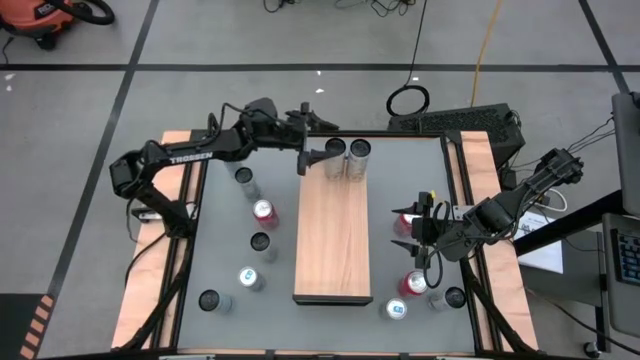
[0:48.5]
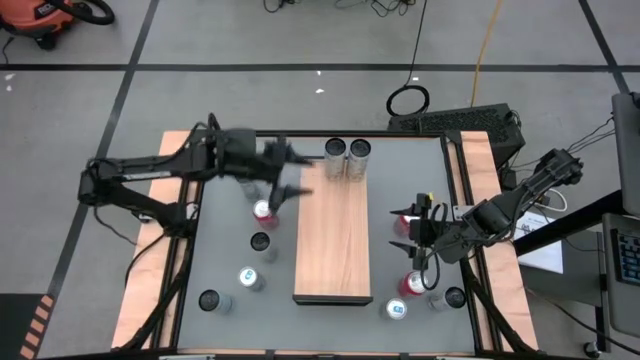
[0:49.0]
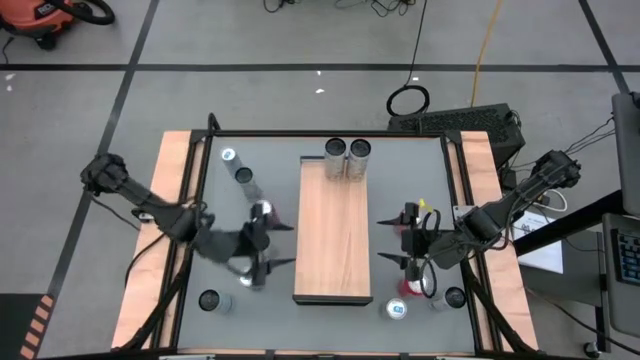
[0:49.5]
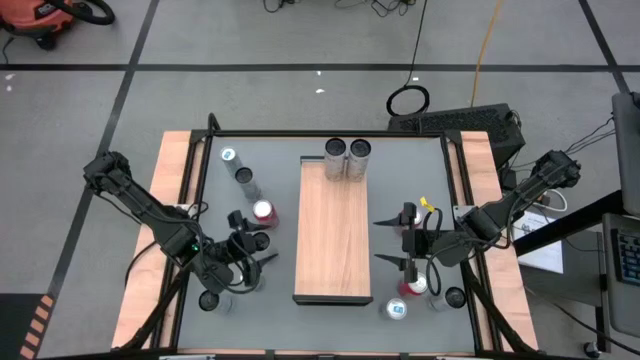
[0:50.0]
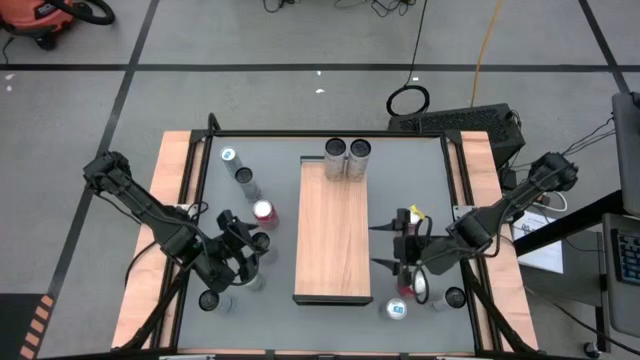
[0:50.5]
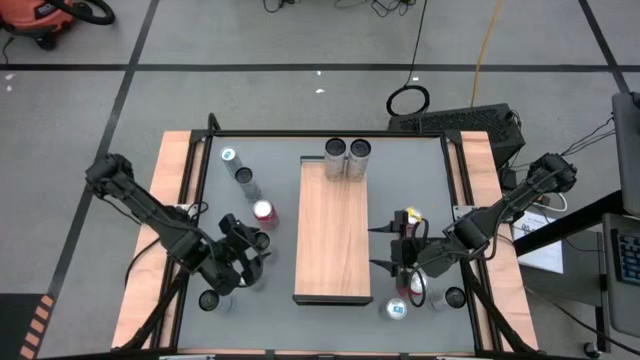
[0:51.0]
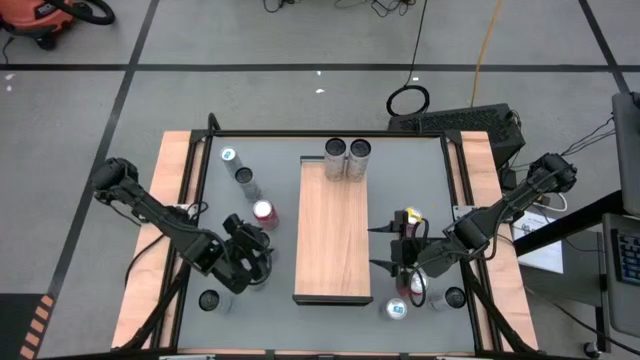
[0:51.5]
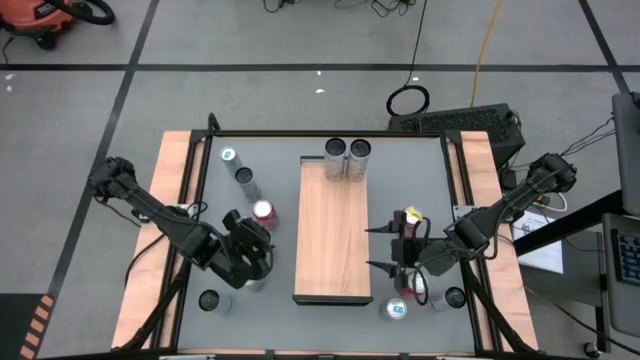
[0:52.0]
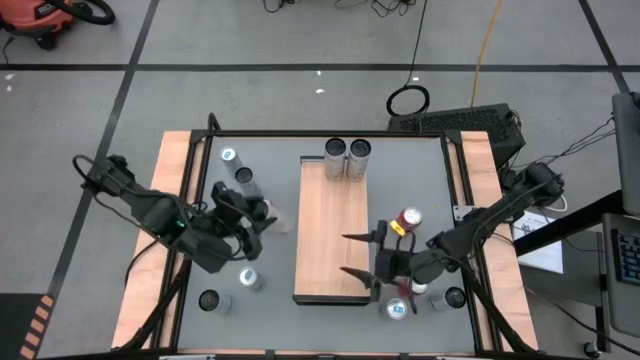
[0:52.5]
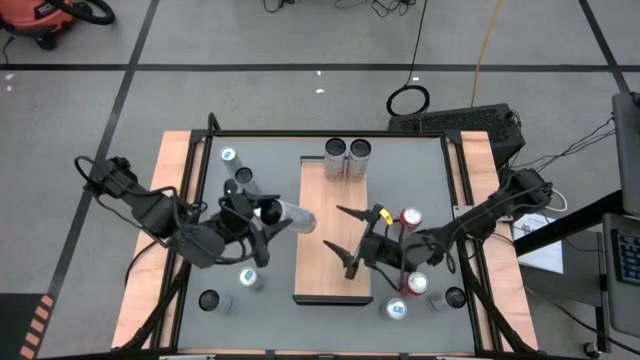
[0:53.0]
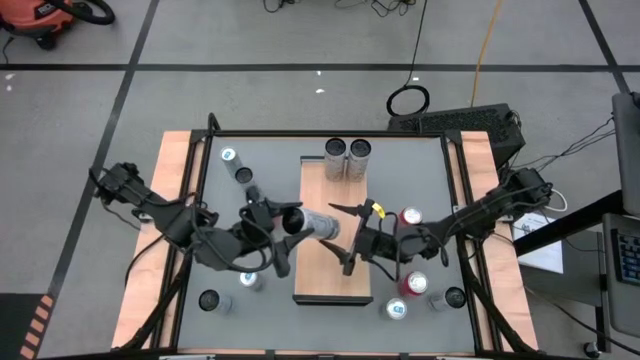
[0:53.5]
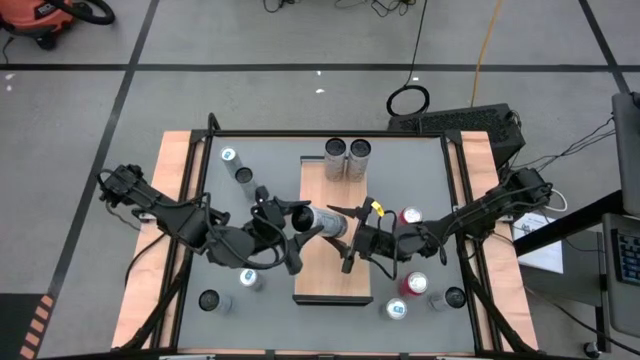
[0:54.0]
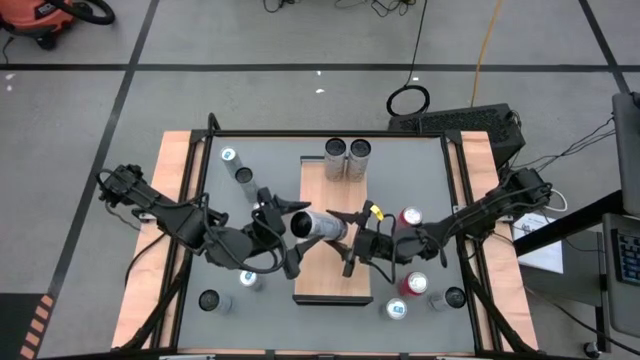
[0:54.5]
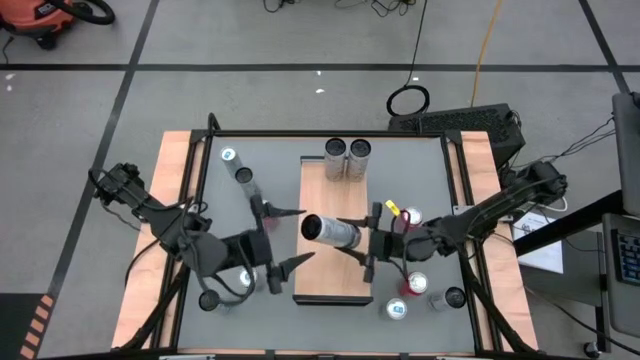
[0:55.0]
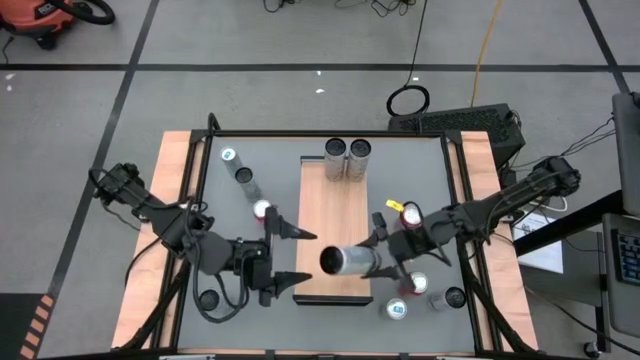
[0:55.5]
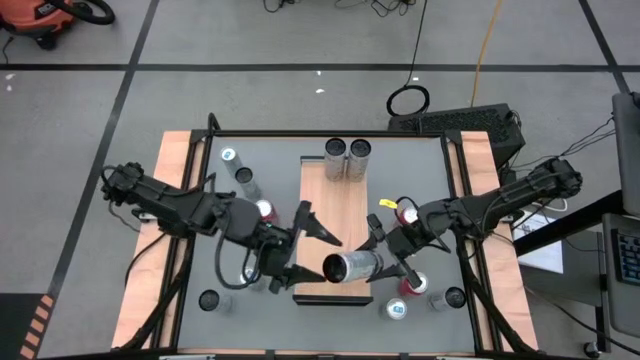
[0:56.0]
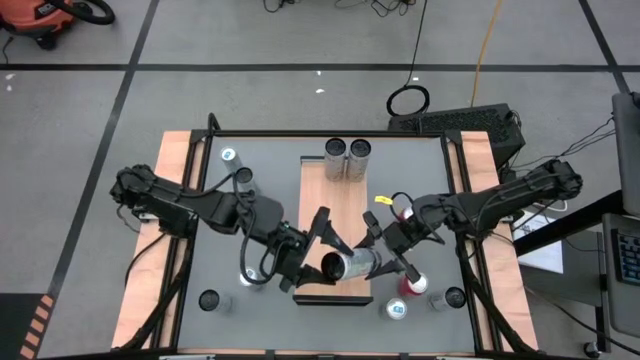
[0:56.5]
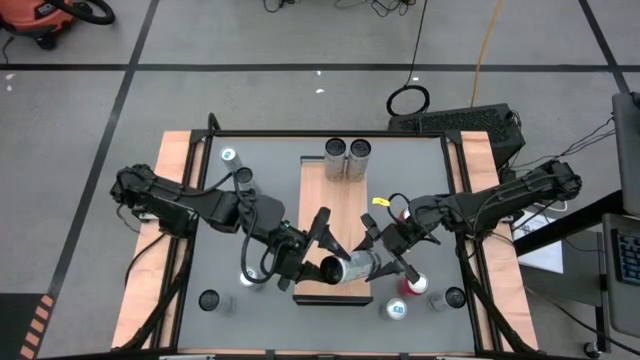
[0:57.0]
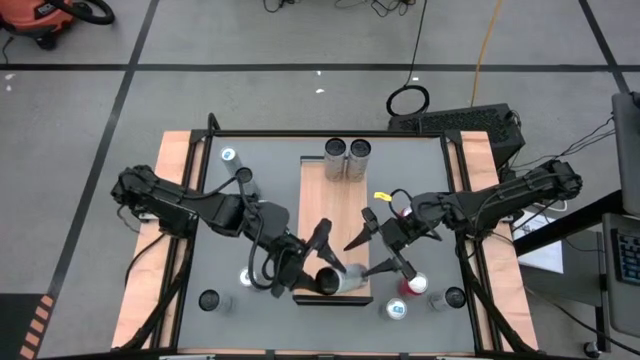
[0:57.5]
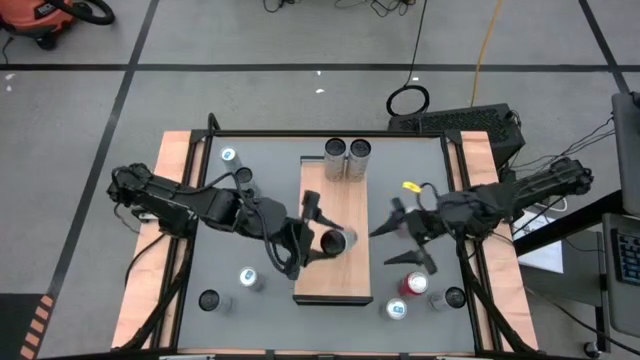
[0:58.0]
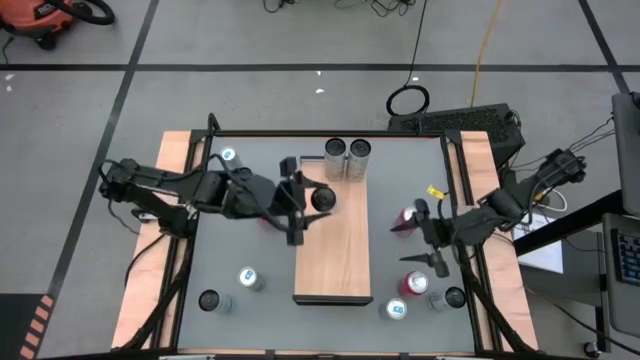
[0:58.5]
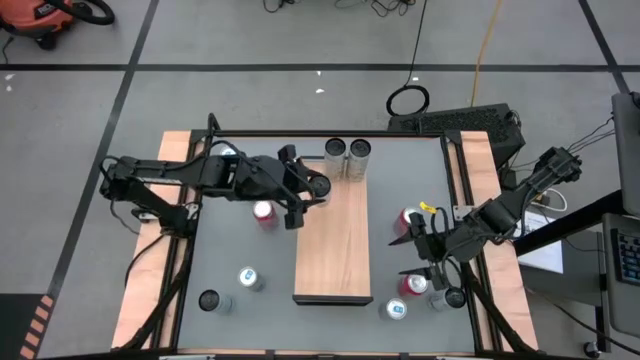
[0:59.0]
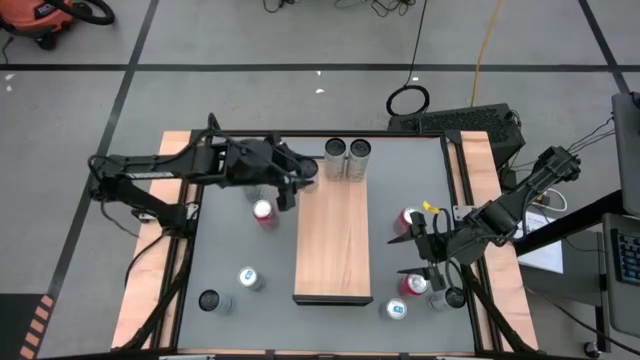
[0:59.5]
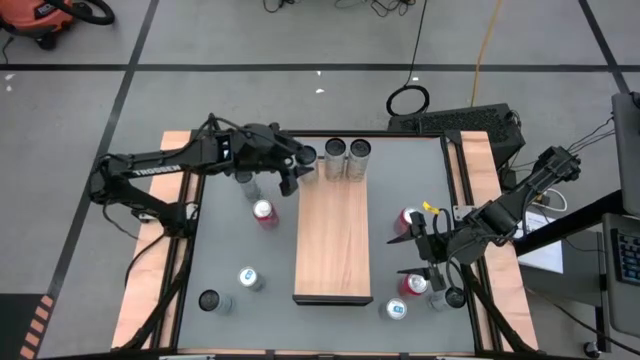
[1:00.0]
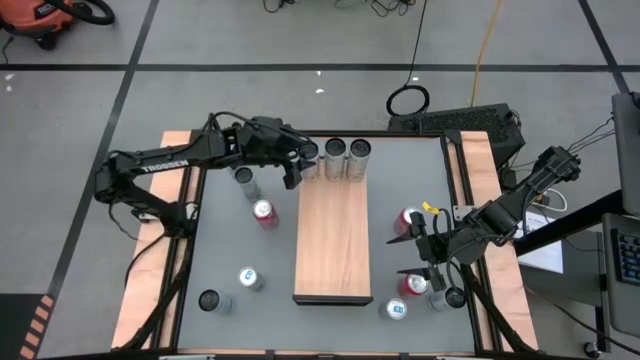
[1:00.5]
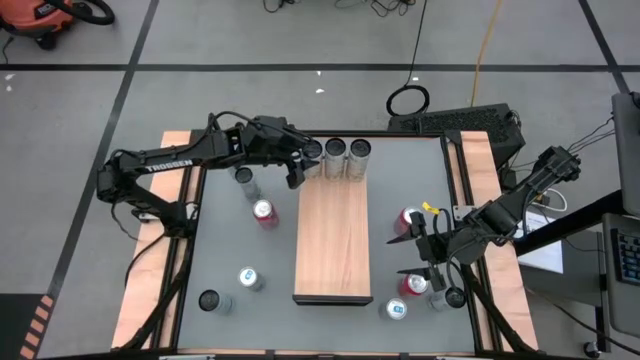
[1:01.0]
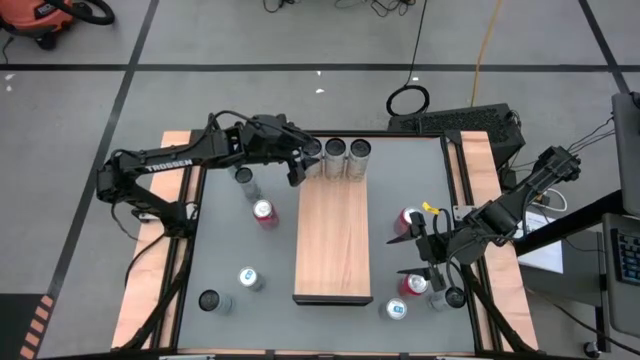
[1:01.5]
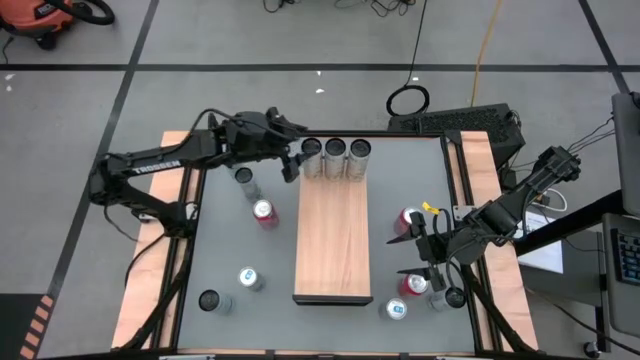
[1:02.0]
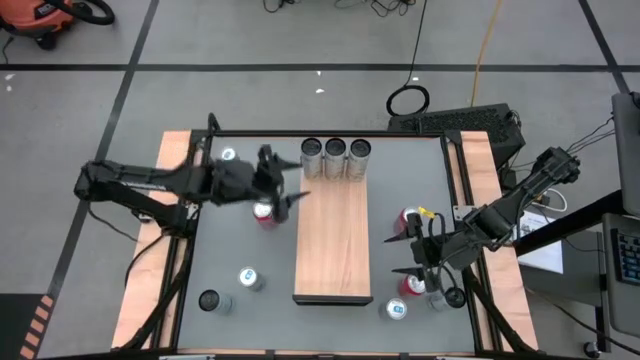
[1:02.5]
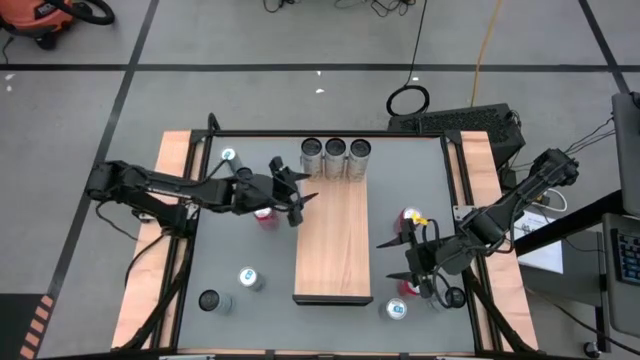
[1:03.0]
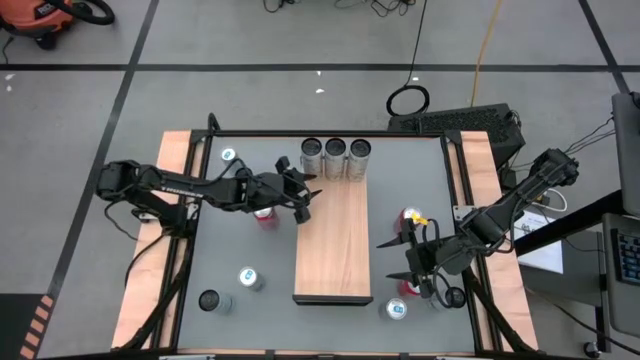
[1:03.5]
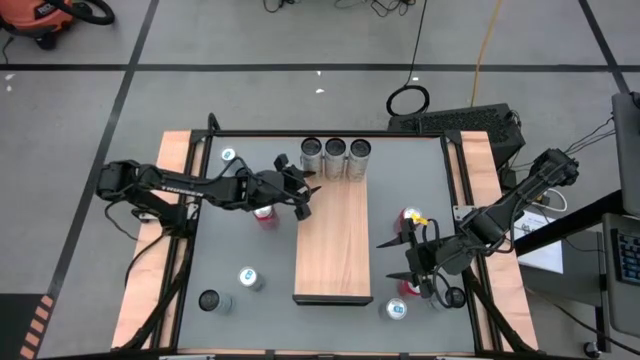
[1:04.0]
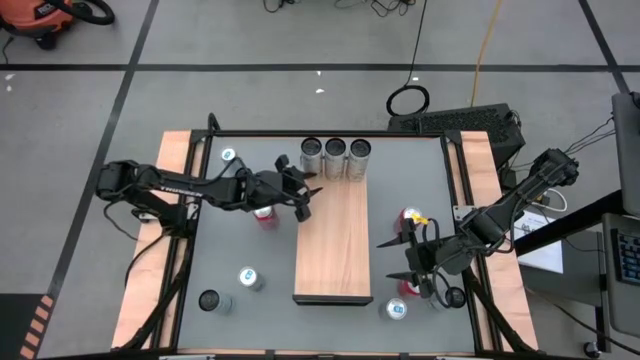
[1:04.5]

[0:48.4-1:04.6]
Task: Place canned beverage on shelf
Put the white yellow soda can on the shelf aligned with the other white yellow soda cans

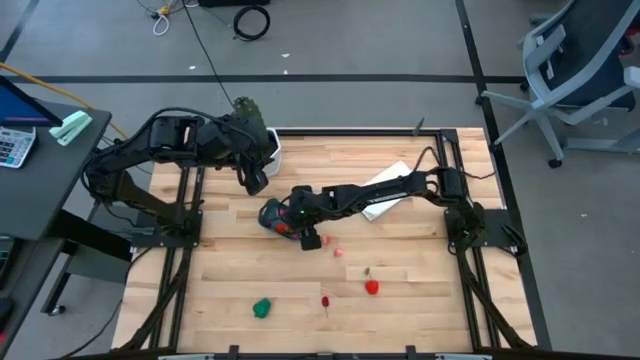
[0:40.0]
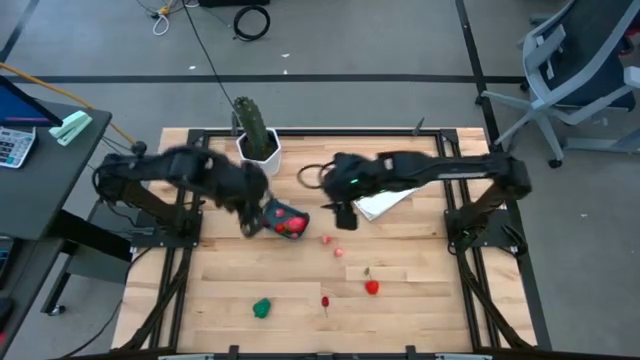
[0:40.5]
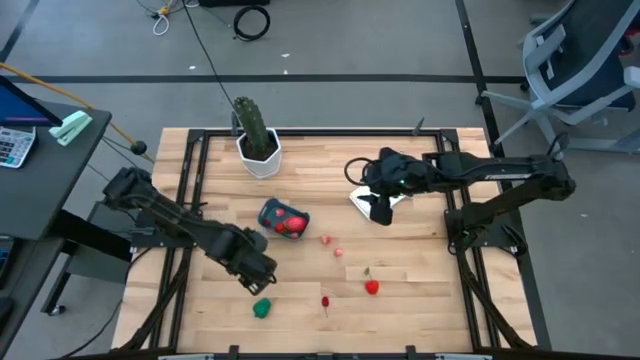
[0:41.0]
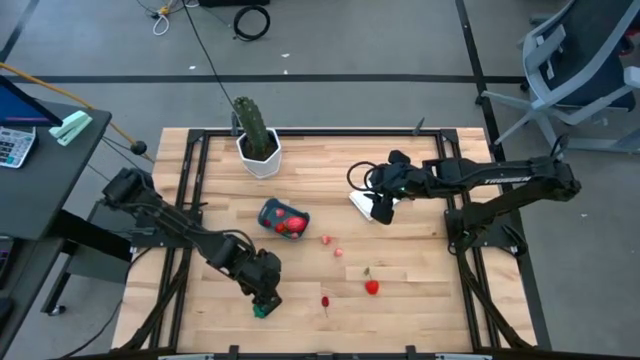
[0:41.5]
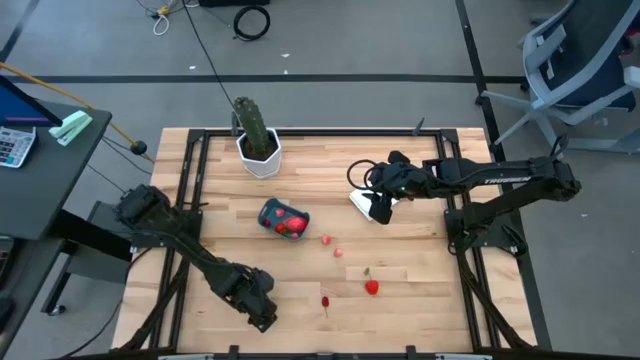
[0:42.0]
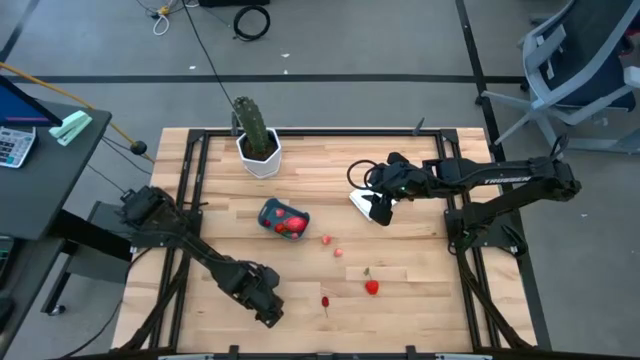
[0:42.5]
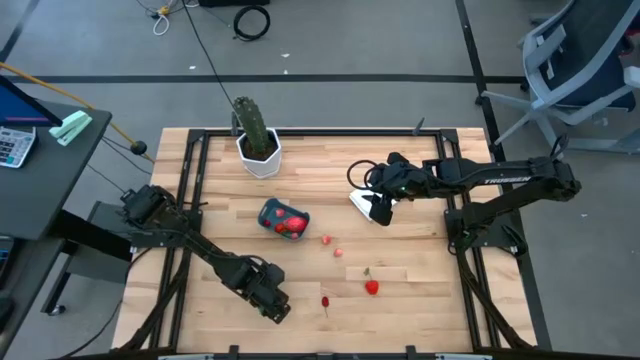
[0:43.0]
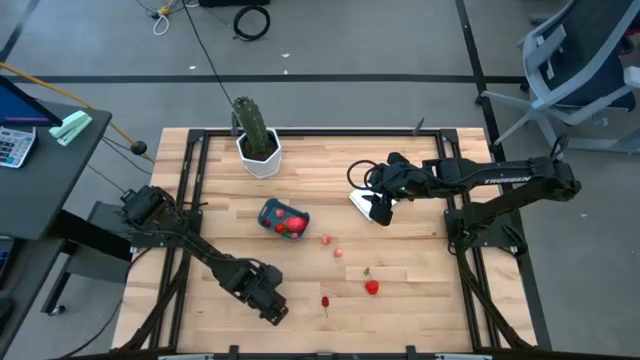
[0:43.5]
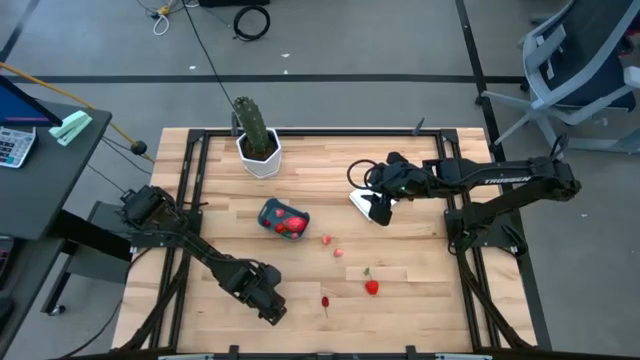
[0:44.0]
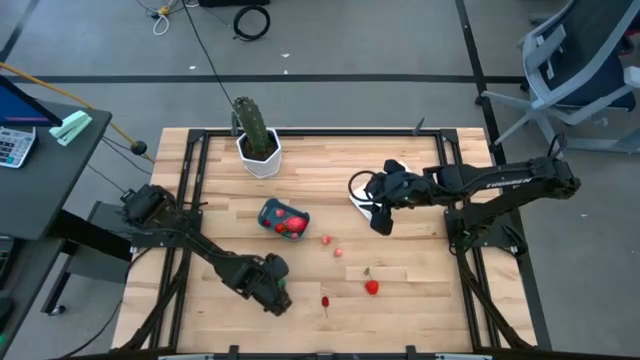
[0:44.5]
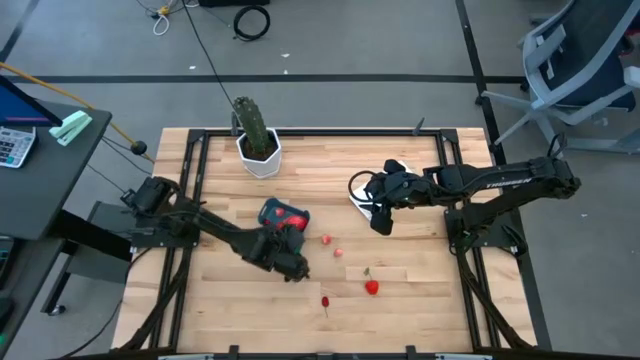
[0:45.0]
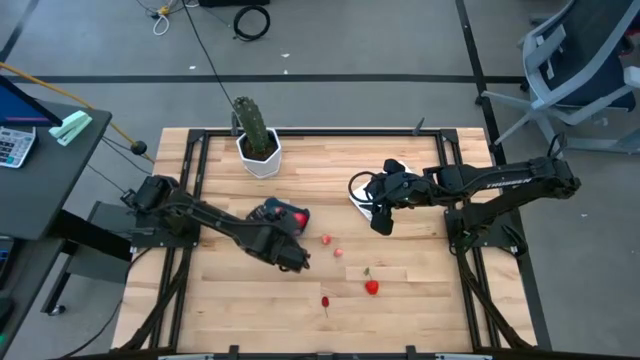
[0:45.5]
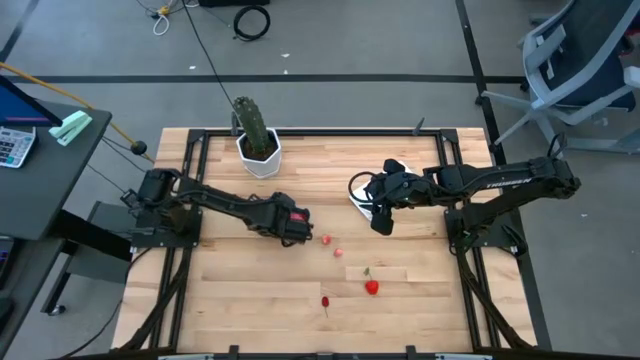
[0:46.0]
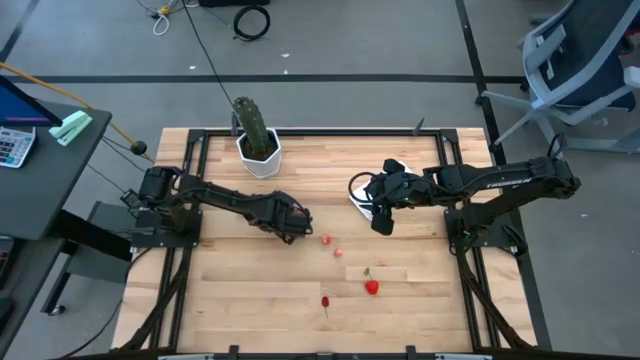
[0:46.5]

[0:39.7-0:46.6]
Task: Pick and placing Produce into tupperware
Put the green bell pepper into the blue bin
